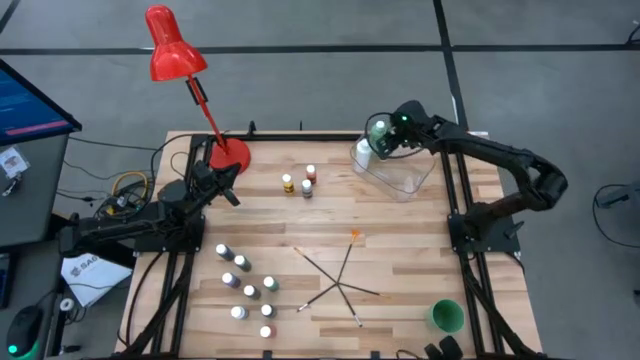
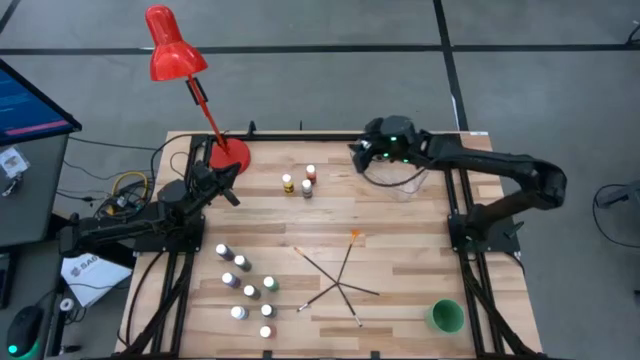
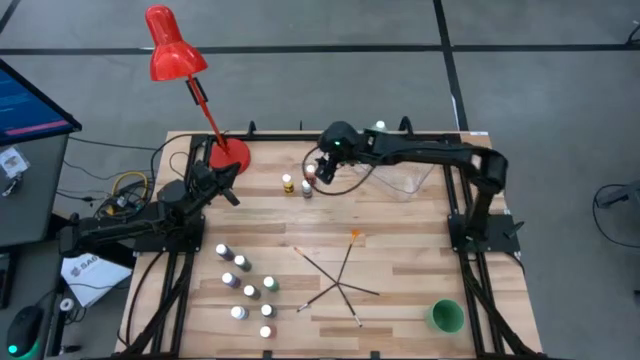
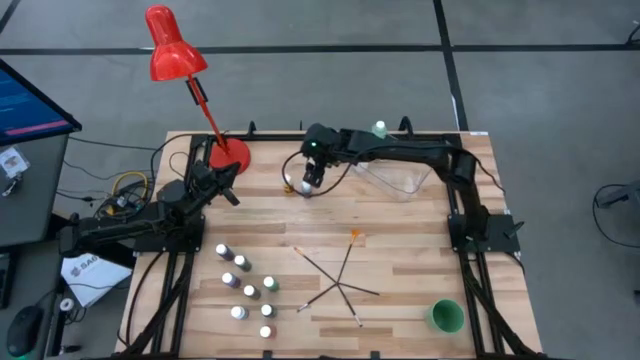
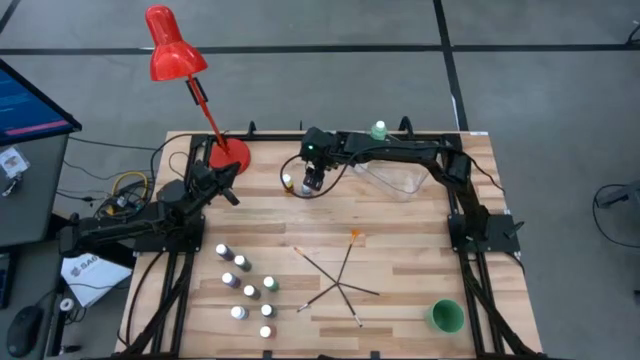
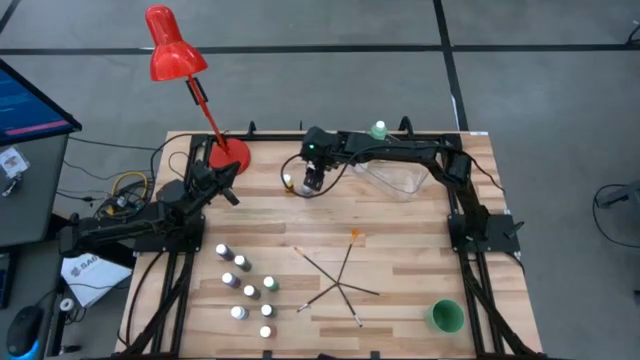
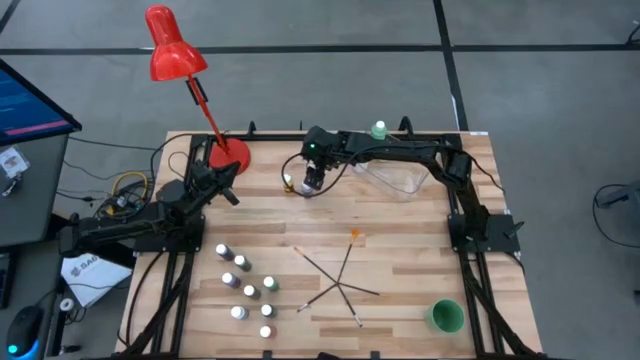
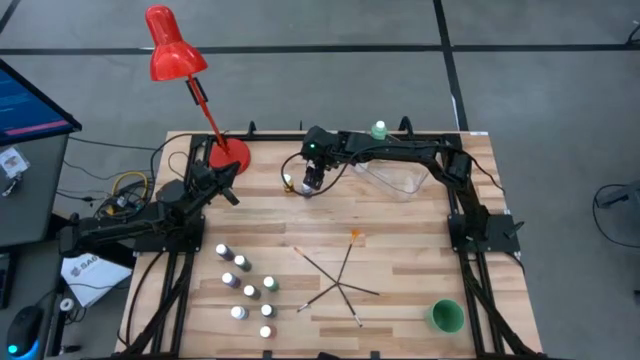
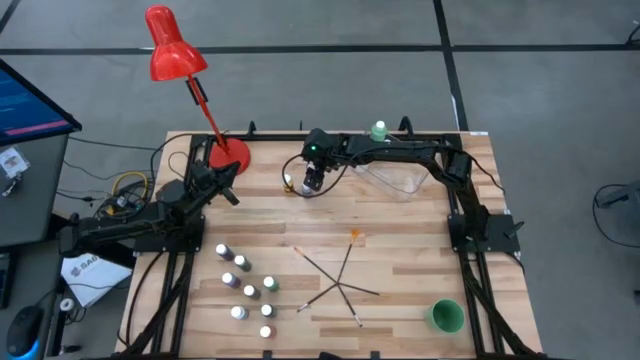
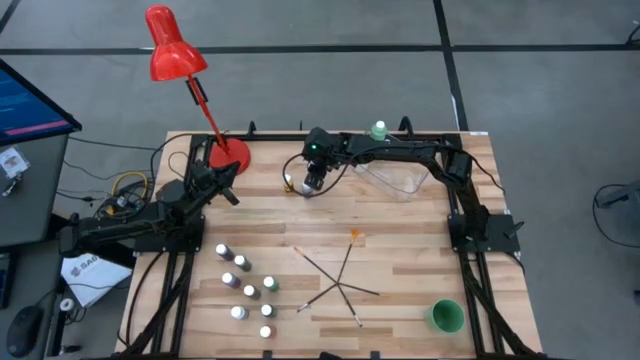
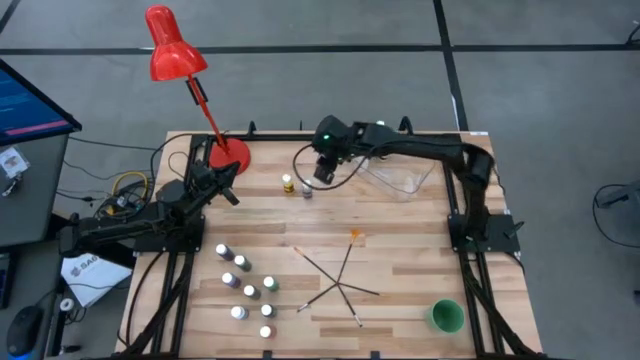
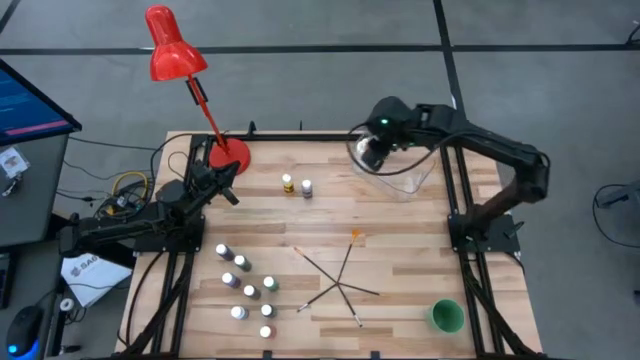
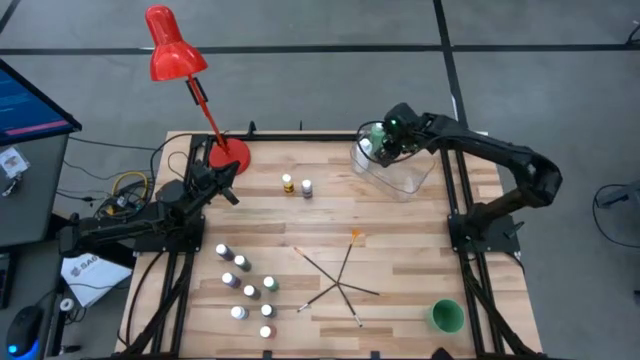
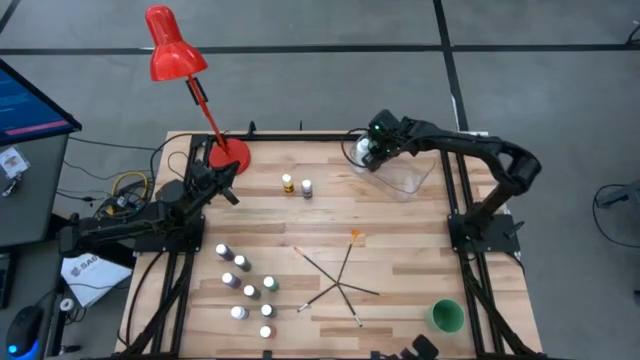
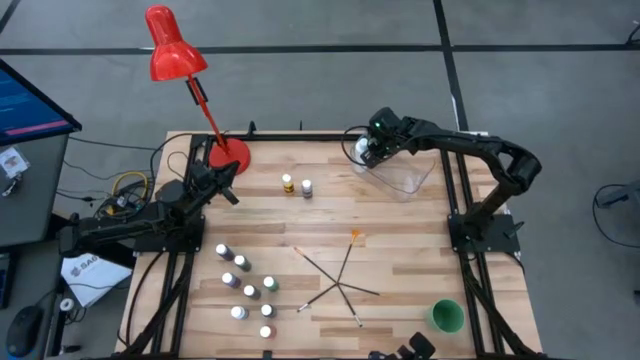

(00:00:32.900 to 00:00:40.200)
Task: Pick & Place Paint Supplies
Put the small orange paint bottle into the transparent bin

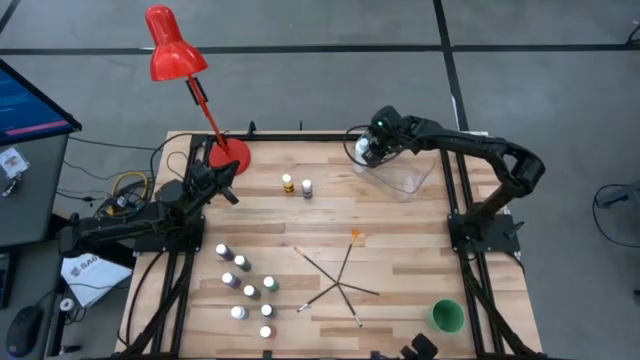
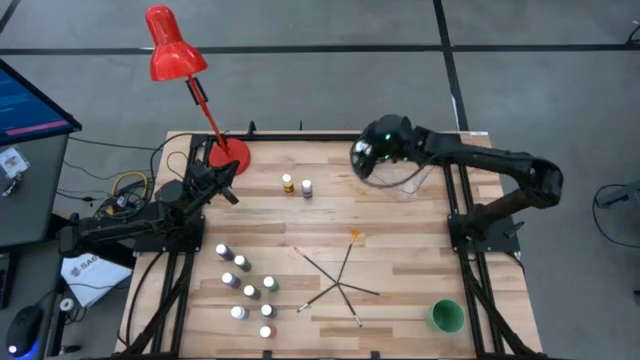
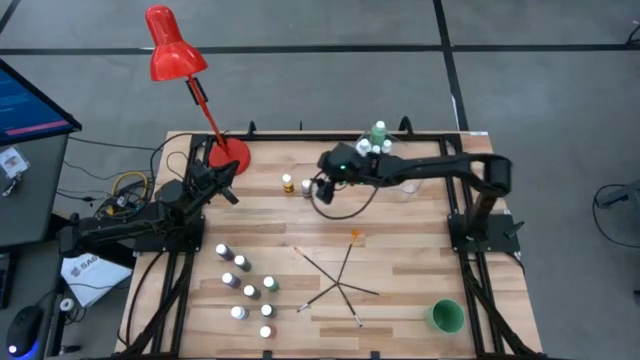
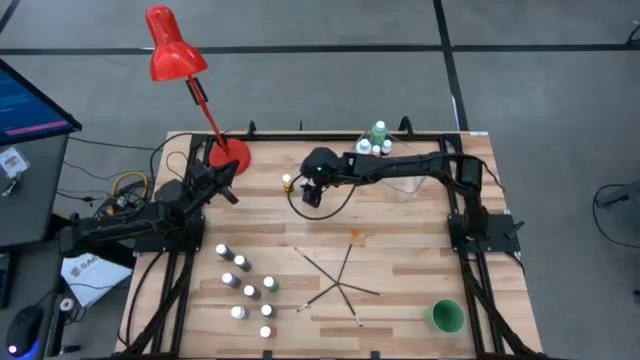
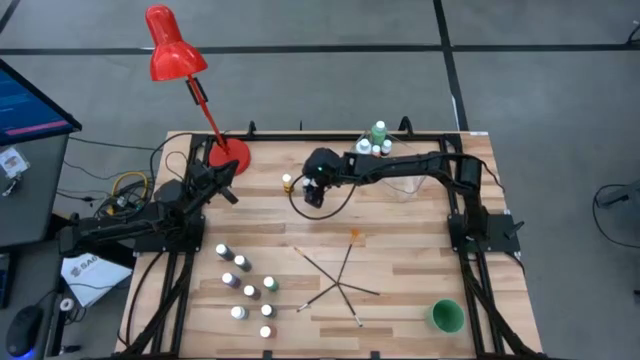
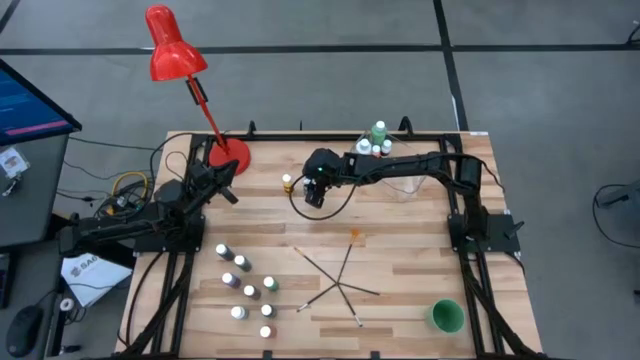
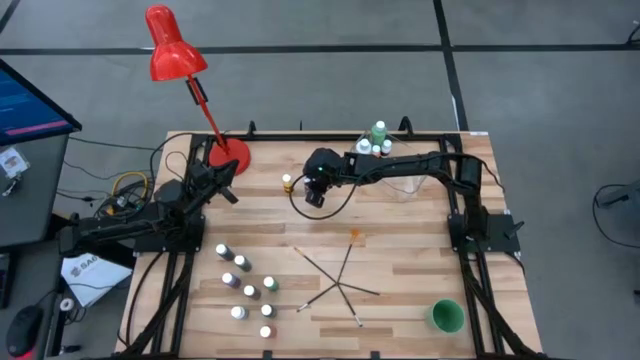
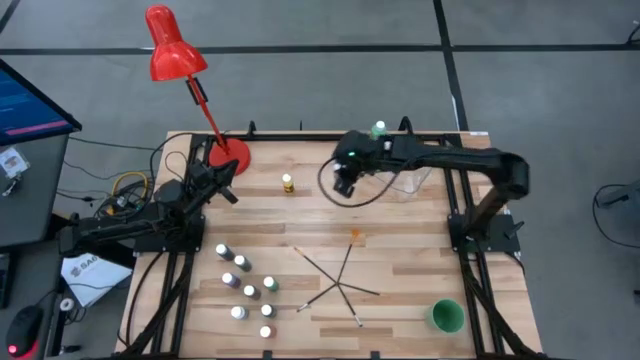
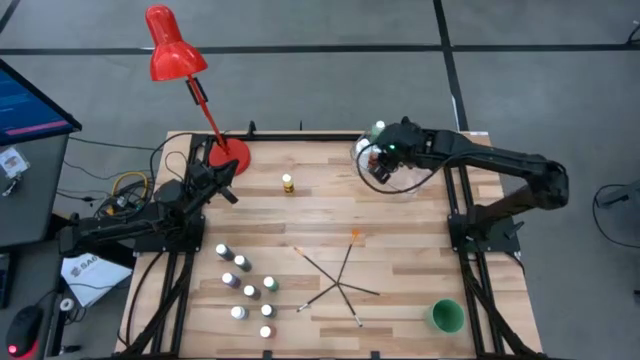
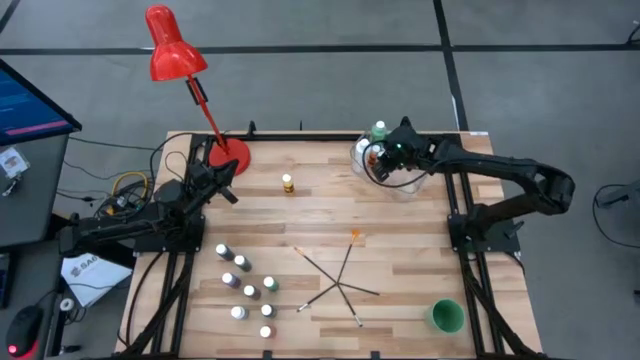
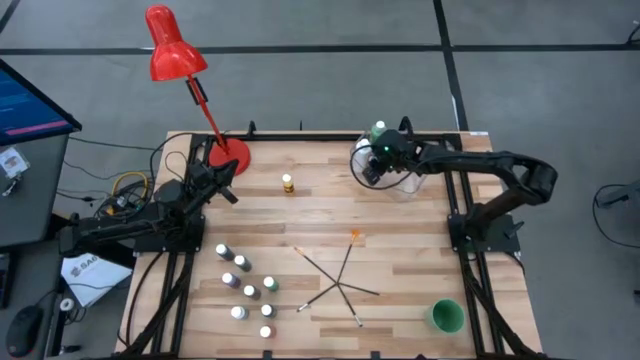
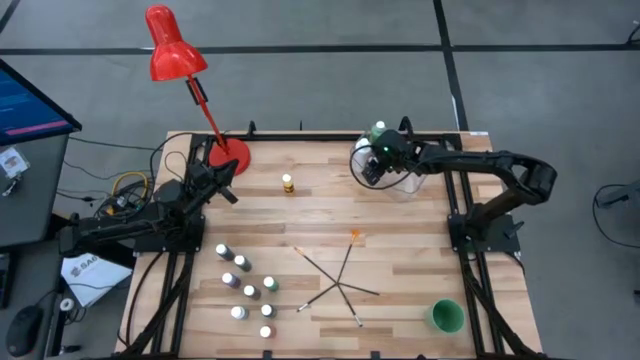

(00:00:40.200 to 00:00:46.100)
Put the small gray paint bottle into the transparent bin

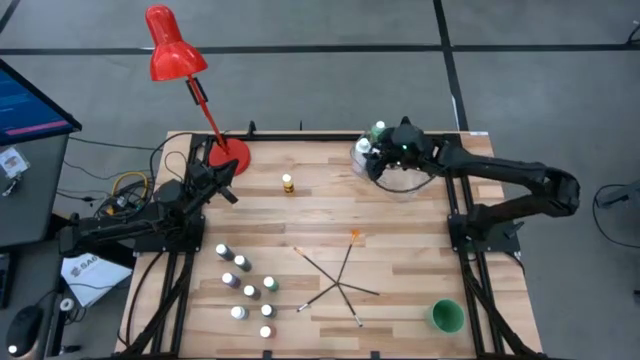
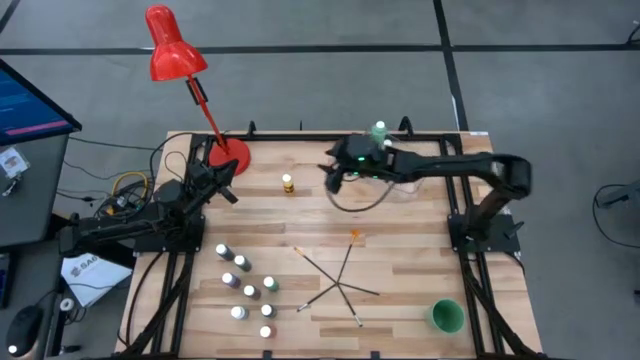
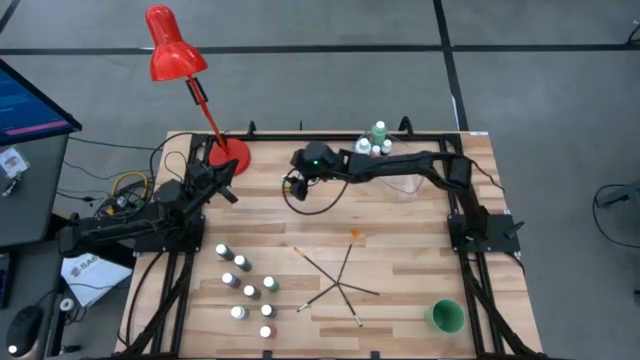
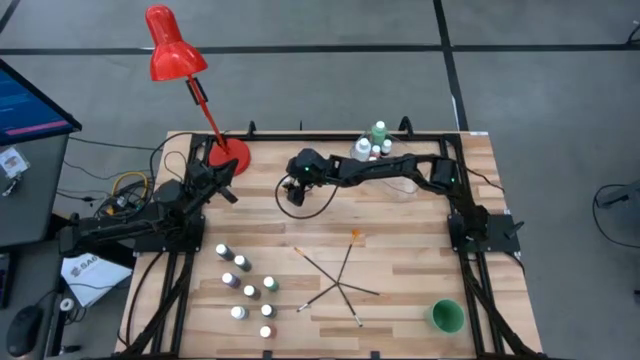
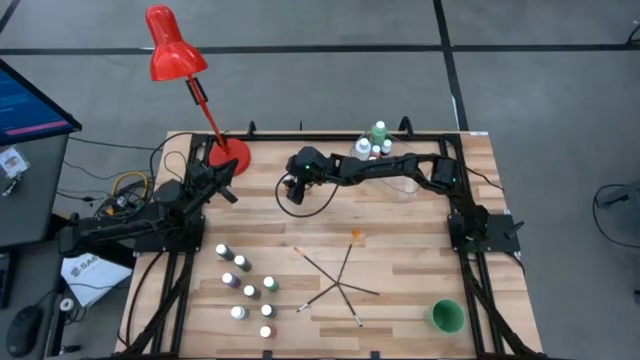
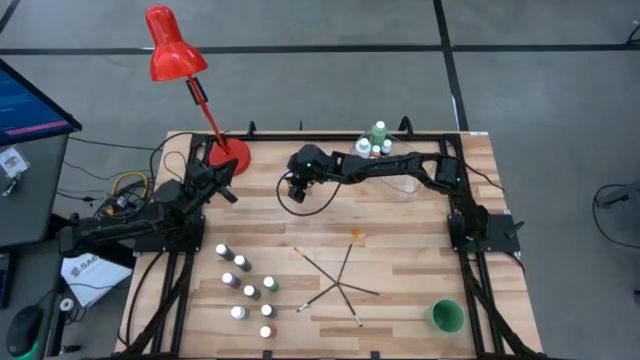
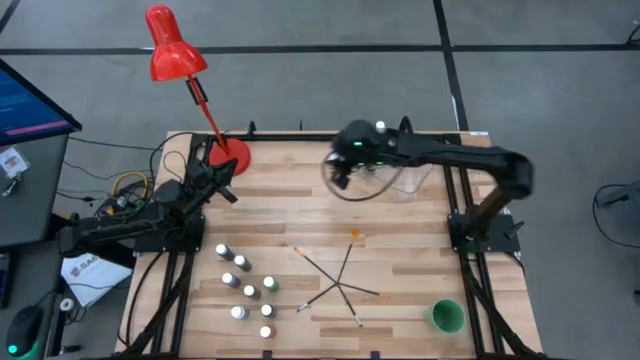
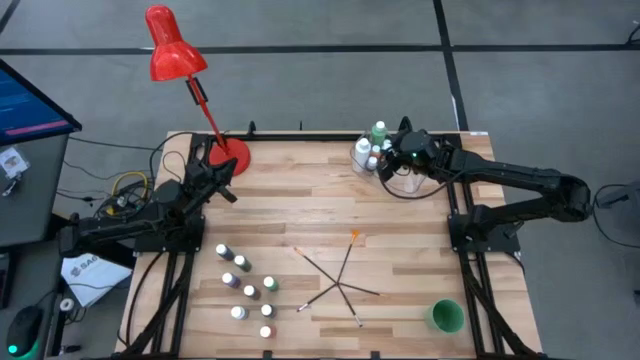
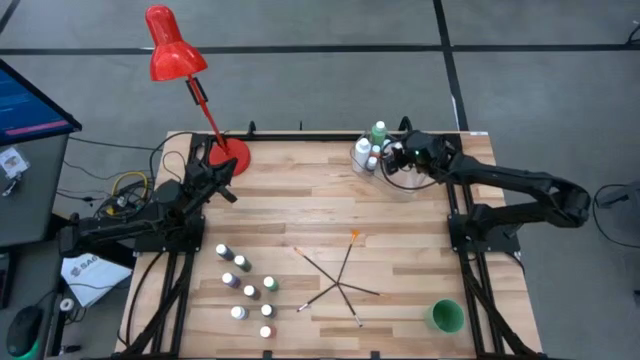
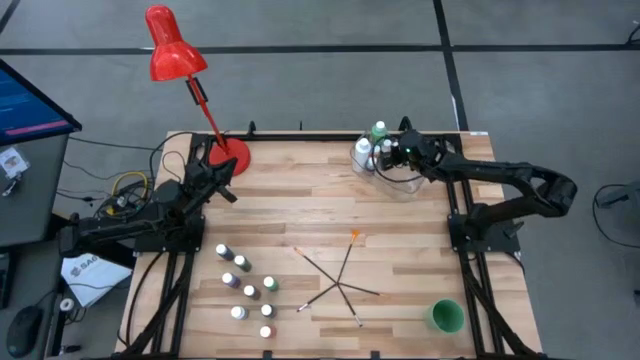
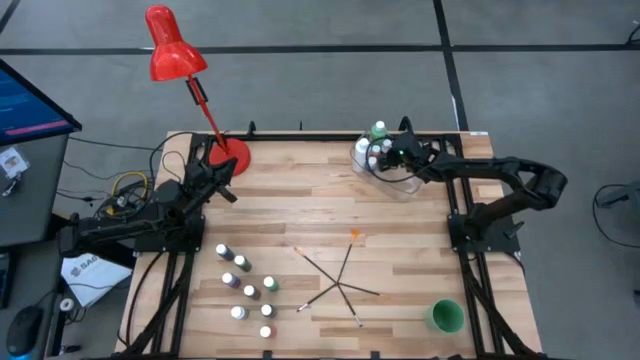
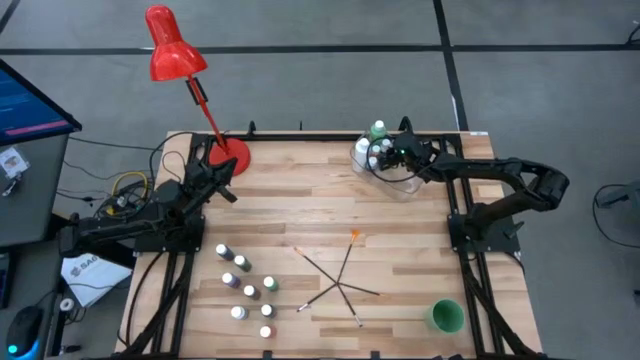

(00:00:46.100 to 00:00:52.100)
Put the small yellow paint bottle into the transparent bin

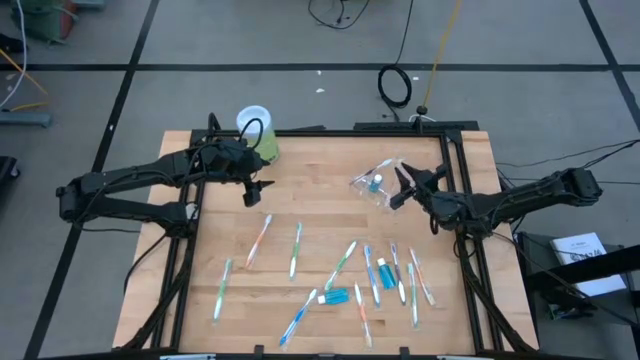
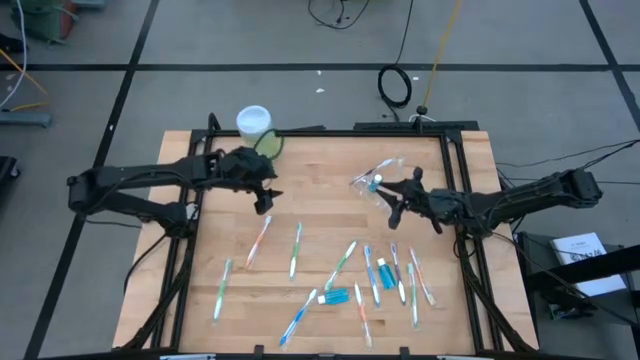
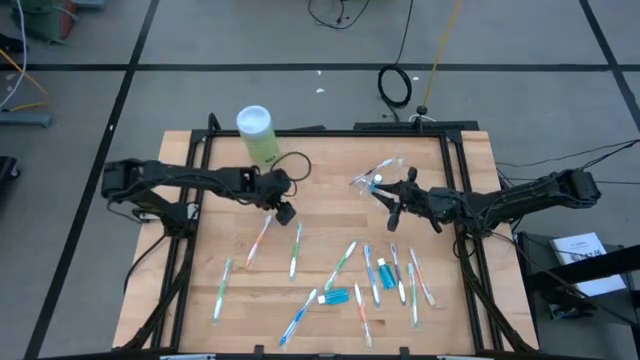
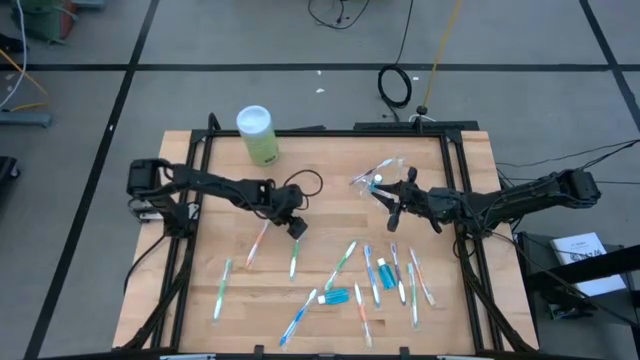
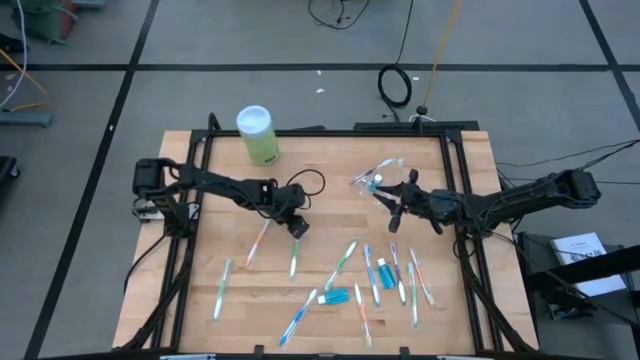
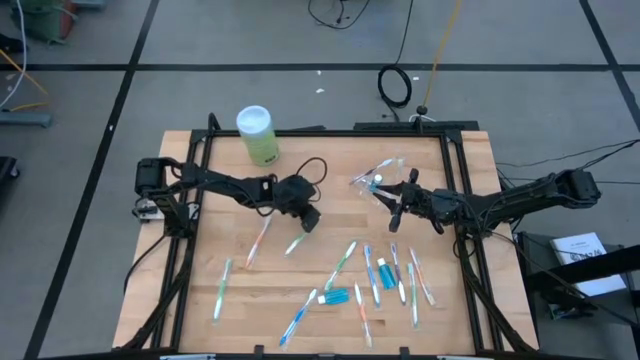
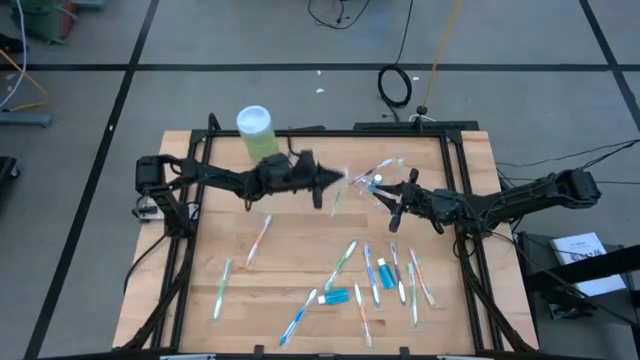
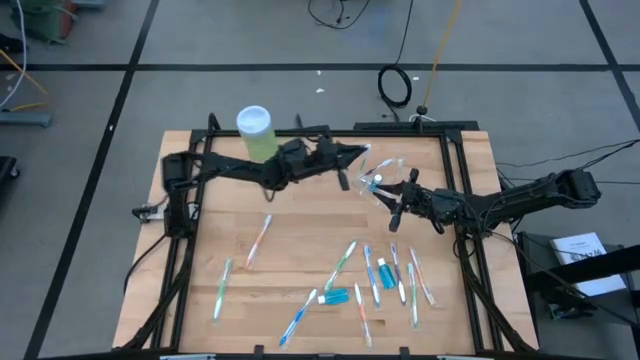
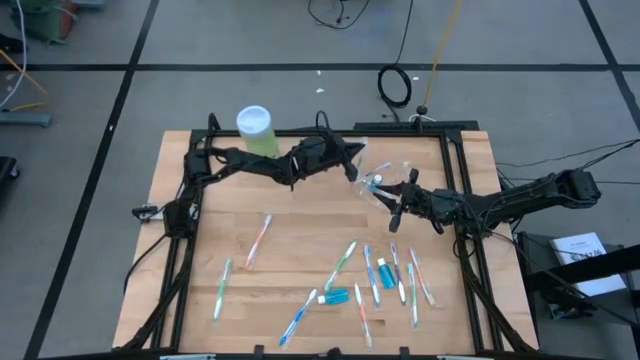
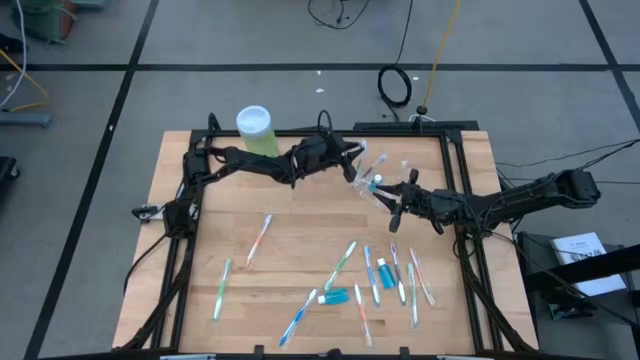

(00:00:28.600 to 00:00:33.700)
Task: Pick & Place toothbrushing station
Put the green toothbrush into the transparent organizer
